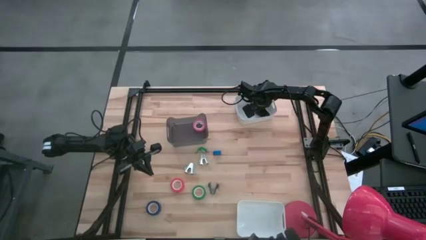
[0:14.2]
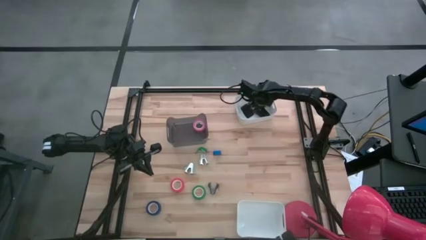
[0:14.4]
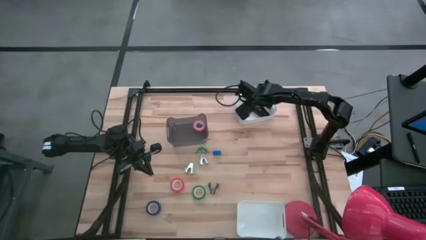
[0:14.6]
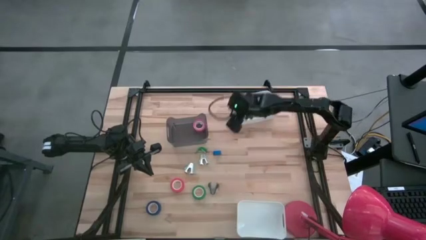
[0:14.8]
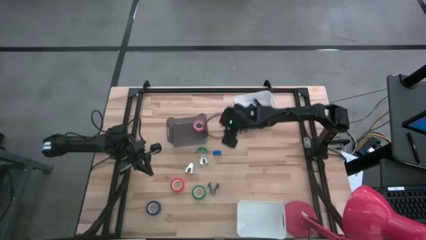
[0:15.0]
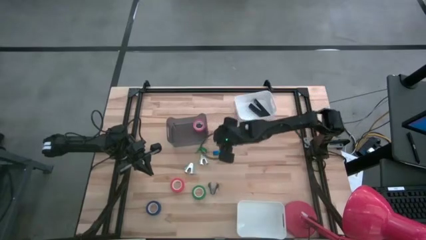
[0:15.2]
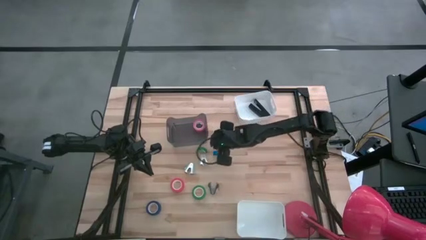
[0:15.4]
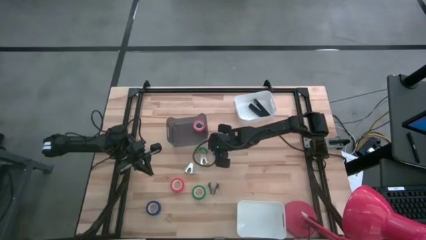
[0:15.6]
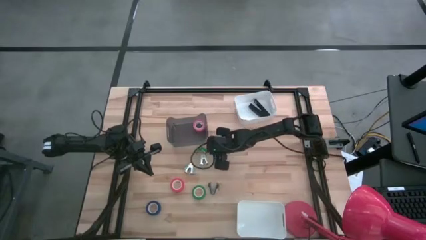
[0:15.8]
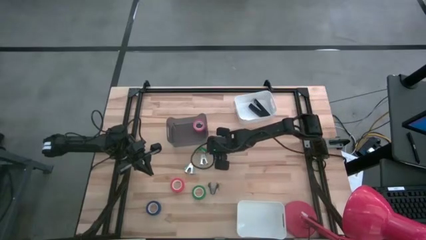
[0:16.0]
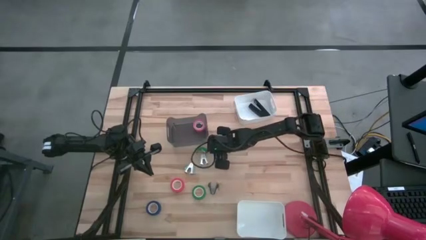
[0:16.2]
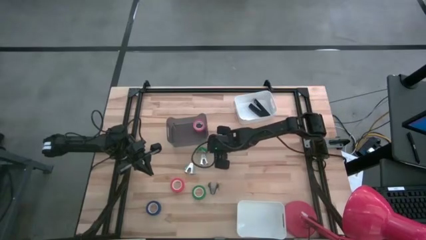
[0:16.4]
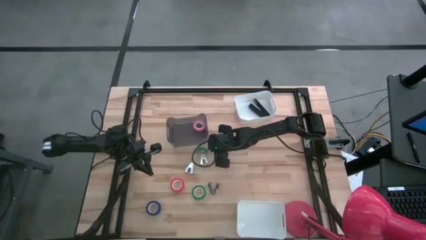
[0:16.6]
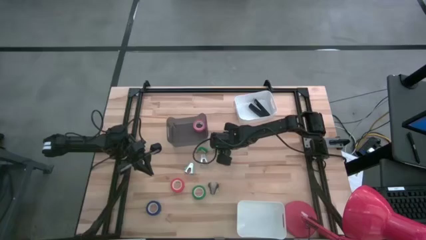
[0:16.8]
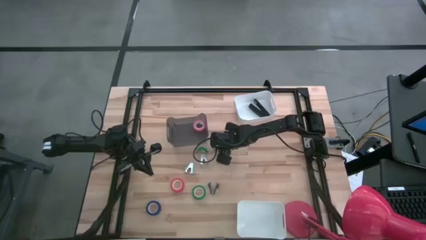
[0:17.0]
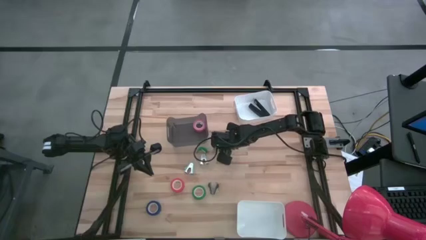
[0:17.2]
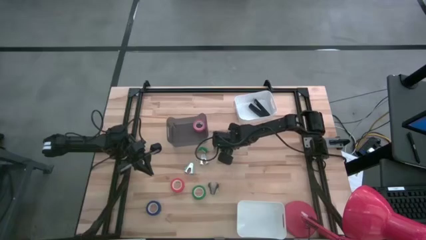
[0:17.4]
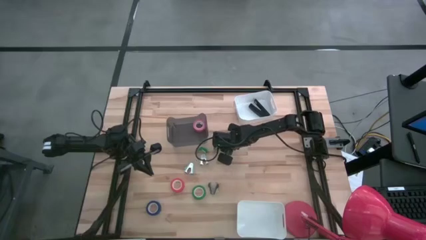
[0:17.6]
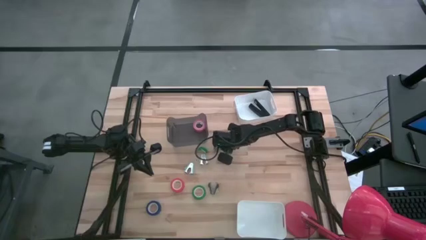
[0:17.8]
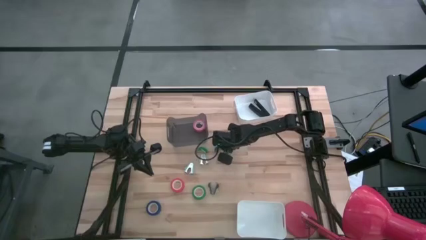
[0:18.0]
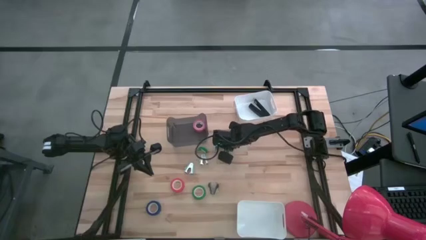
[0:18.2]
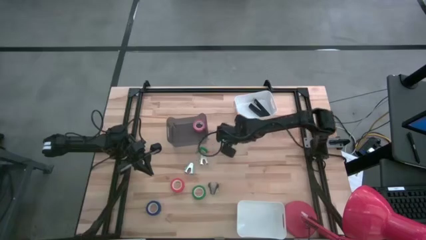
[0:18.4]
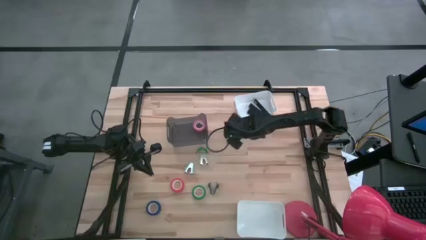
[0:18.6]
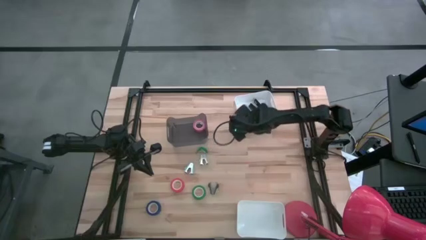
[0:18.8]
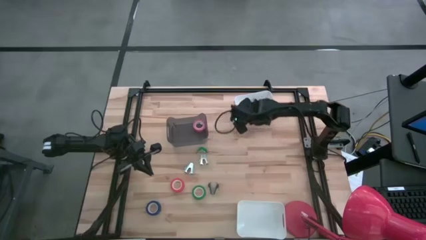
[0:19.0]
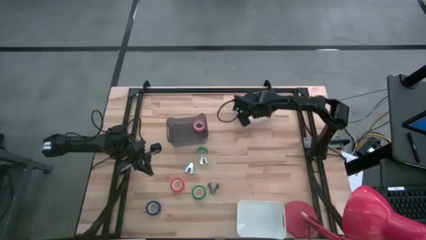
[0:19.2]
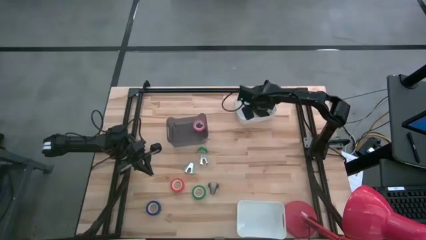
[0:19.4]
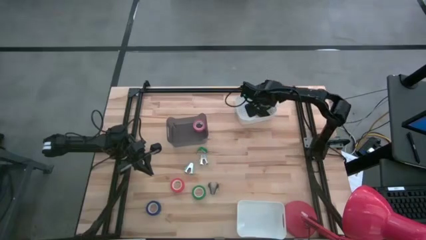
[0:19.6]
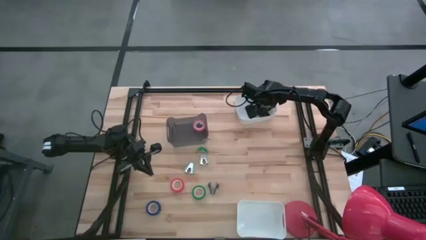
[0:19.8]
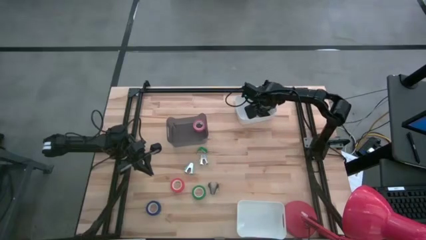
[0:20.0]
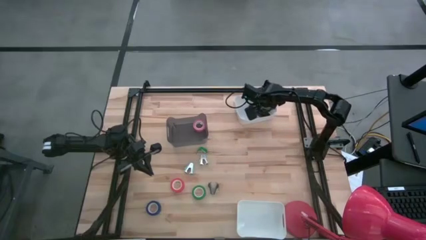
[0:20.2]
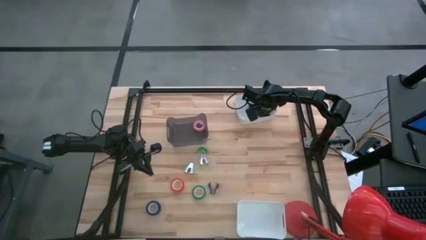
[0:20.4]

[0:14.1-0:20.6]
Task: Pick and place Stapler, Stapler remover, tape
Put the blue stapler into the top white bin

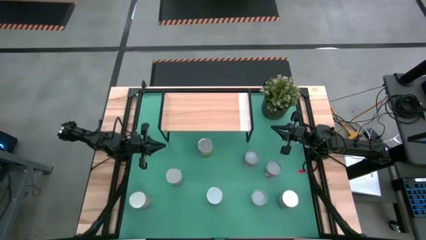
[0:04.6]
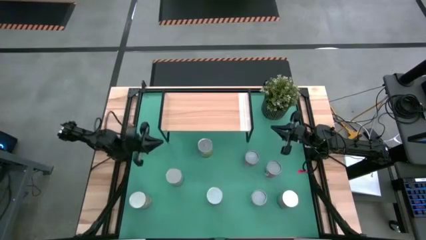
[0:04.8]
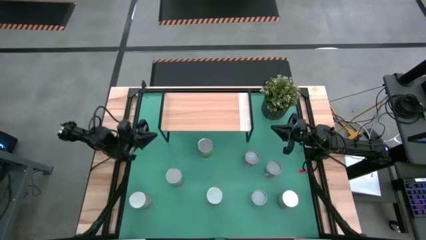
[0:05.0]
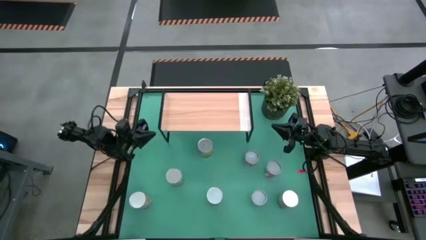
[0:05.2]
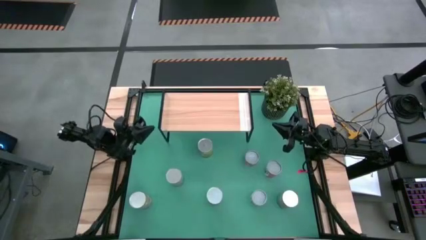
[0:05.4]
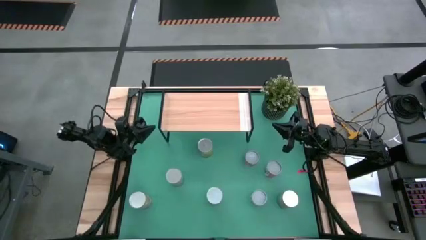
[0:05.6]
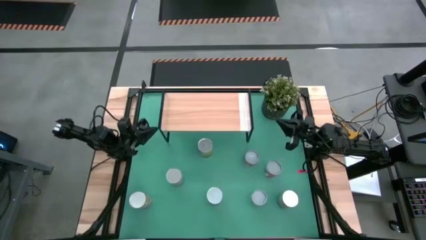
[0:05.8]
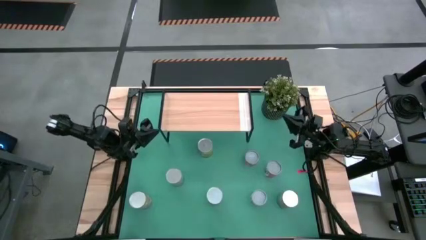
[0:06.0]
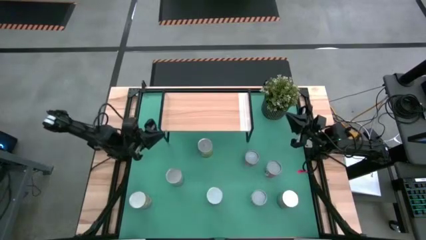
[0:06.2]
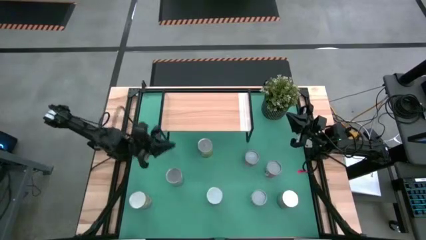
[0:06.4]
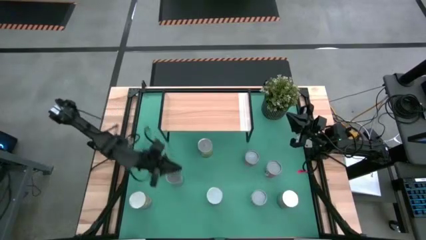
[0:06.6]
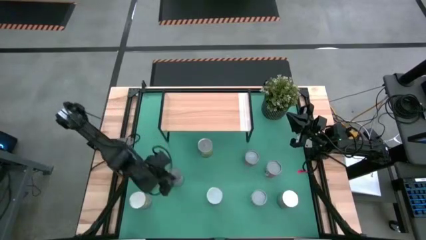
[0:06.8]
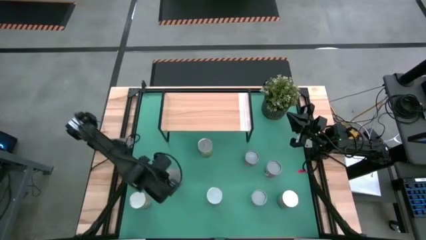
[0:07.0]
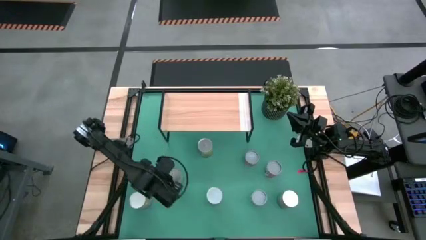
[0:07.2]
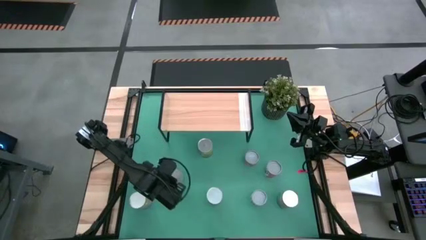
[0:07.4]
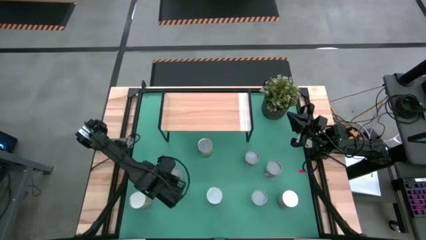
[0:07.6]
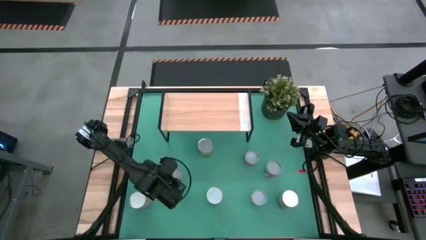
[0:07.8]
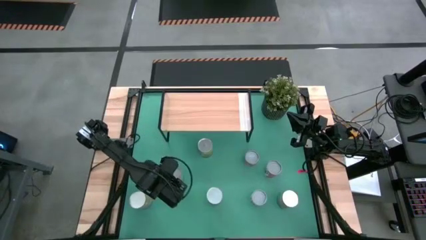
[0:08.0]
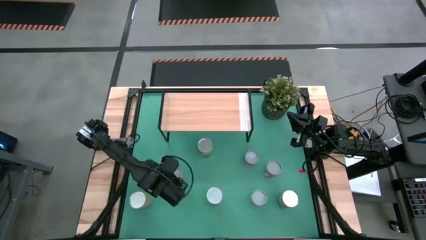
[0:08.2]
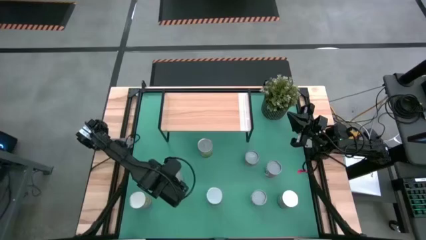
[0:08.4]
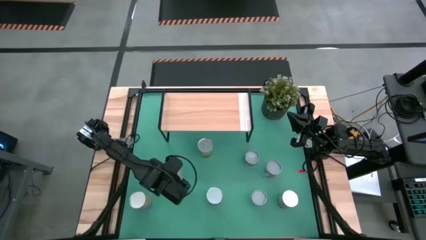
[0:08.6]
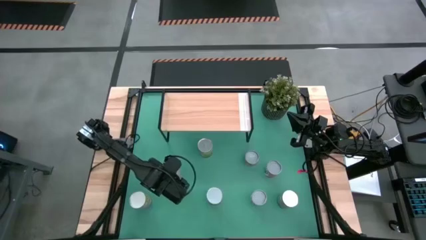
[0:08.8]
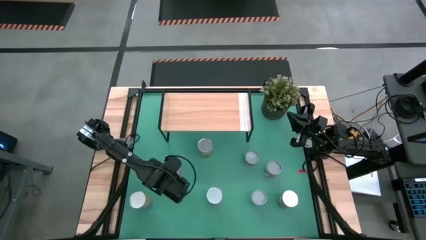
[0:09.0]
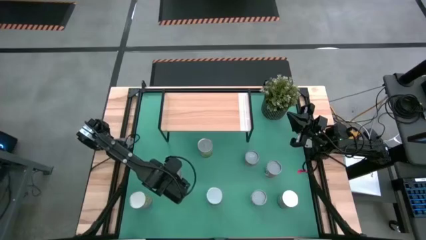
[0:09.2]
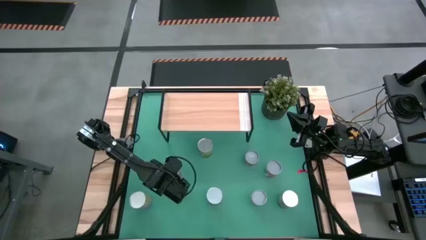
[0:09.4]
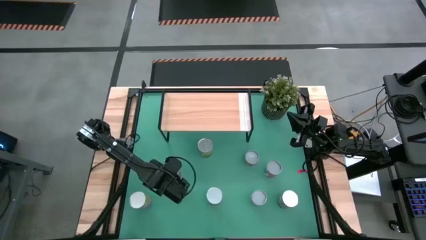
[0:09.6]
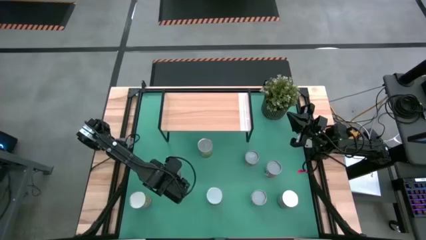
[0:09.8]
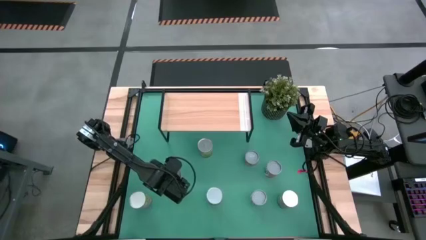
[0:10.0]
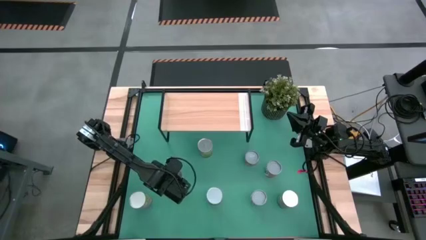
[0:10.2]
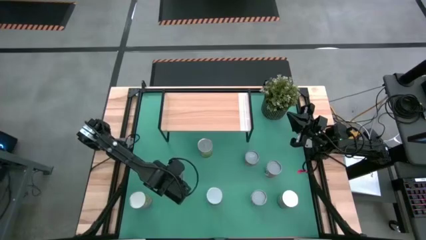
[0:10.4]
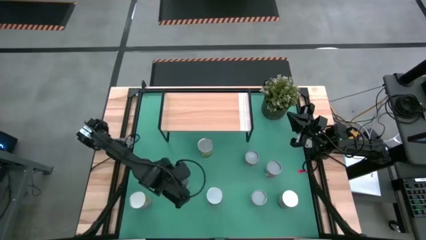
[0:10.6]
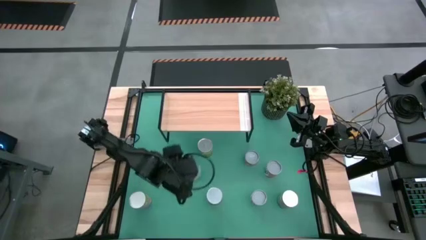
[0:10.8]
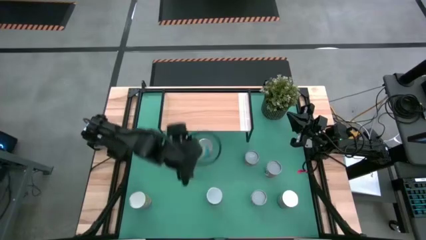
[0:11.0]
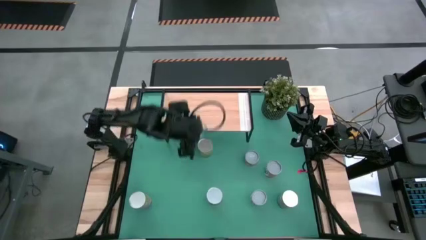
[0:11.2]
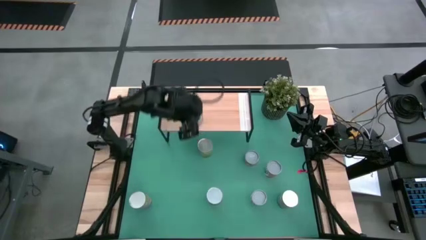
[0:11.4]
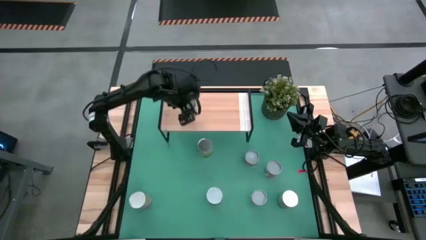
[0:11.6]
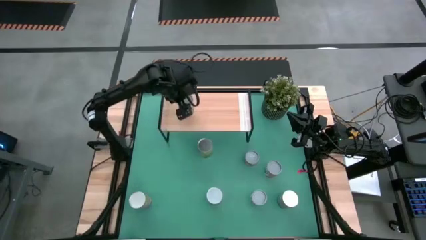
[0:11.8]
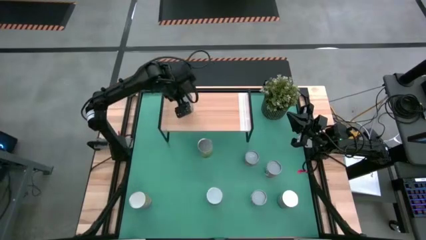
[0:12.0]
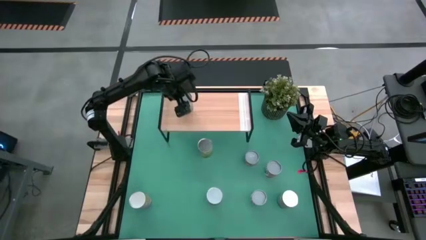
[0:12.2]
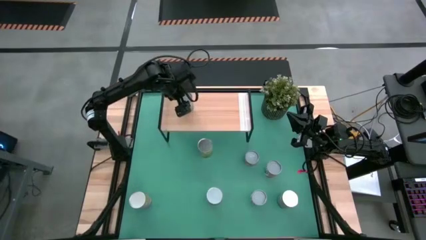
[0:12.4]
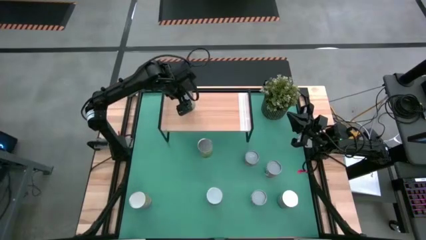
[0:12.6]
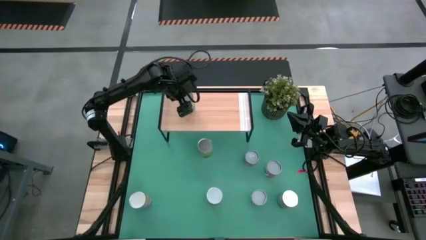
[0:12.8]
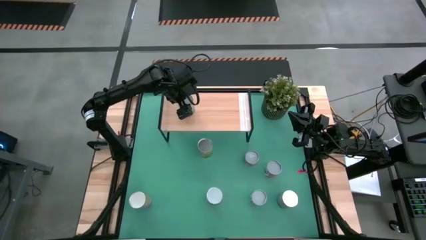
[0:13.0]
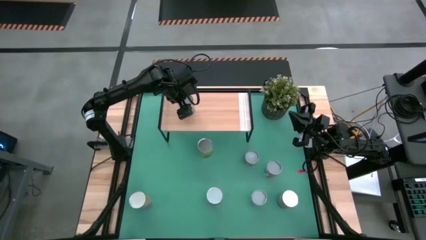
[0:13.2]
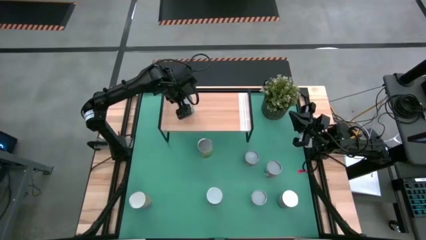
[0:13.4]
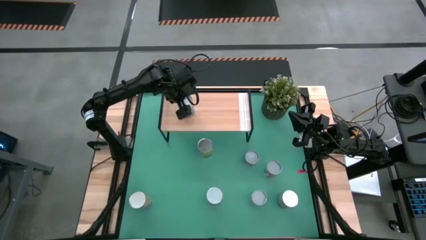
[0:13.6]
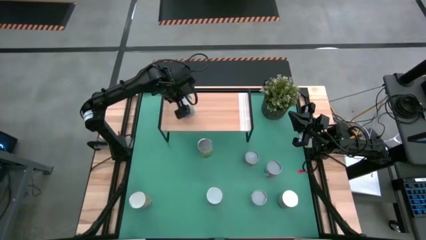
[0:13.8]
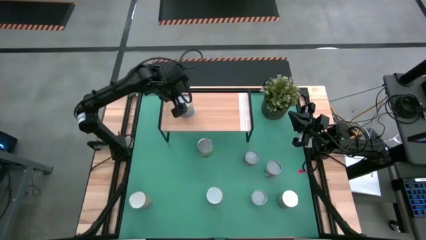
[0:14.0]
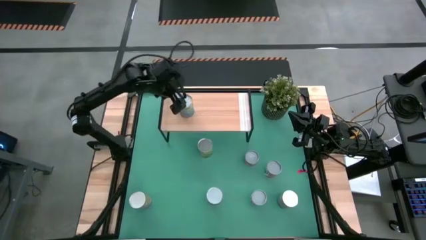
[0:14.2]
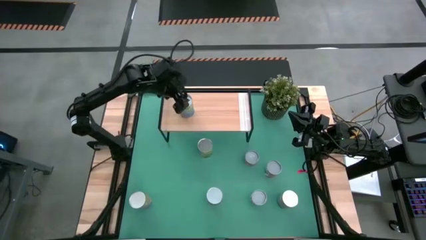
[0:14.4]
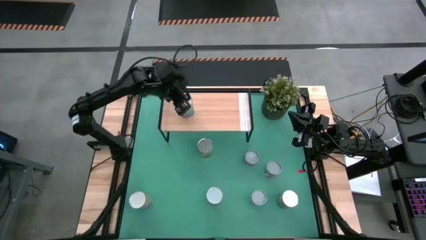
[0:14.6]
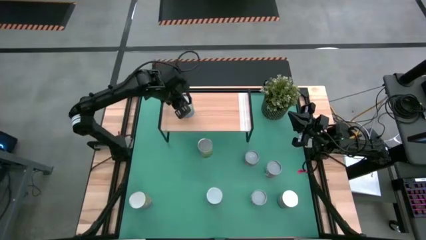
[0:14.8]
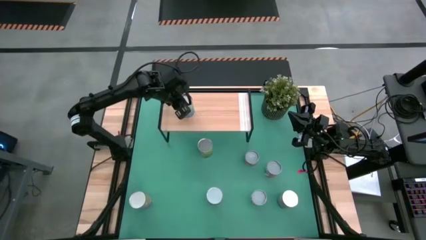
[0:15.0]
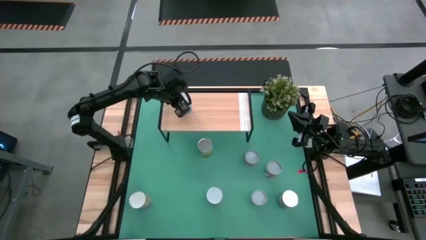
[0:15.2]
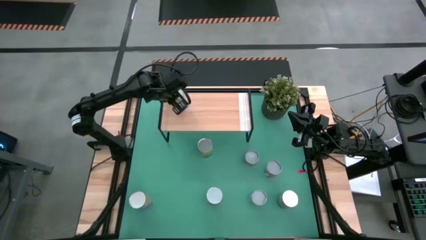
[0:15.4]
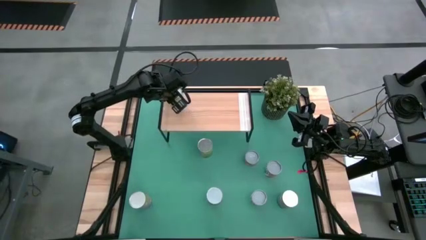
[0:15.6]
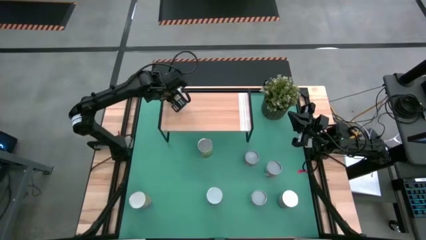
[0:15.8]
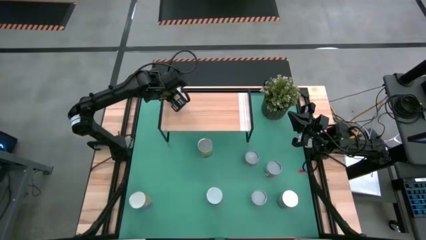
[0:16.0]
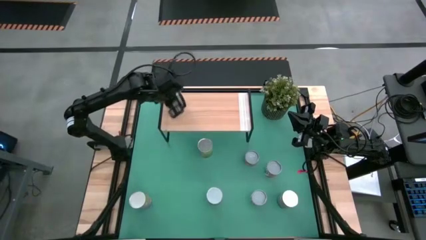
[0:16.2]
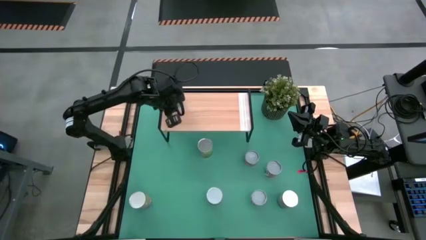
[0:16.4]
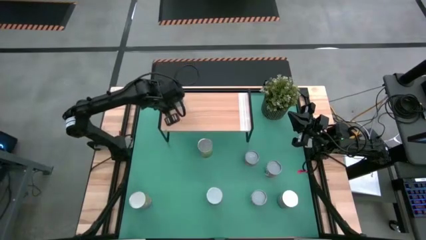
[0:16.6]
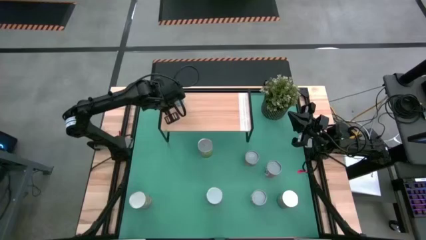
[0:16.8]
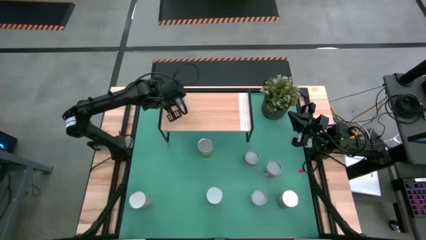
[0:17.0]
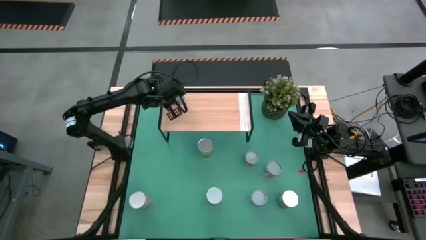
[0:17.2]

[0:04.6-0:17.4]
Task: Pick and place cans onto a shelf
Put the canned cherries on the shelf
